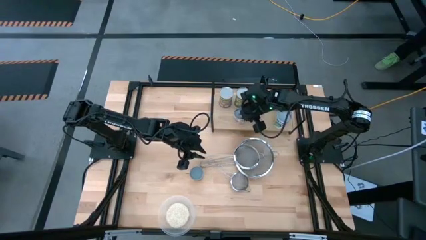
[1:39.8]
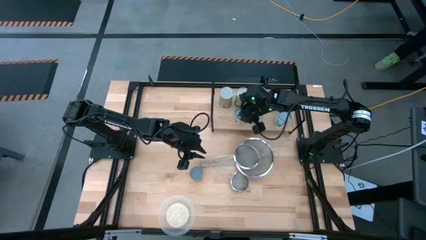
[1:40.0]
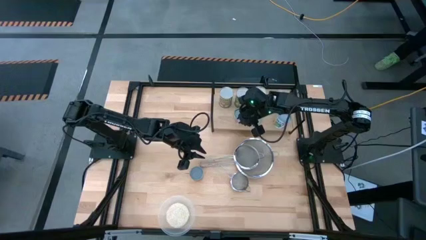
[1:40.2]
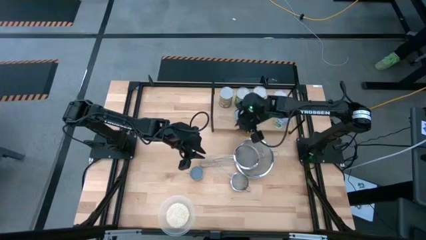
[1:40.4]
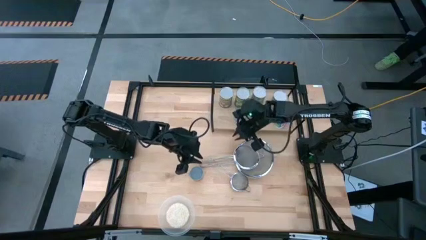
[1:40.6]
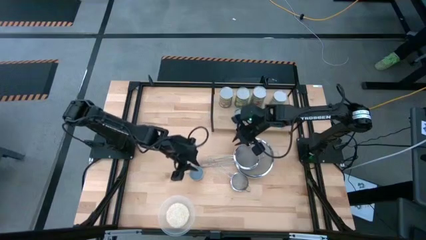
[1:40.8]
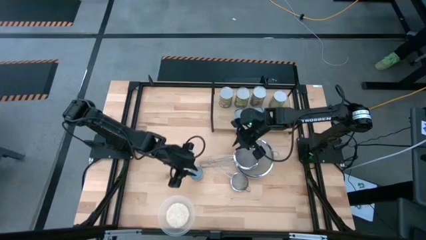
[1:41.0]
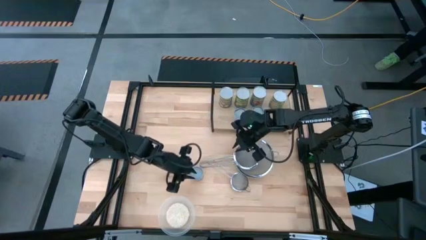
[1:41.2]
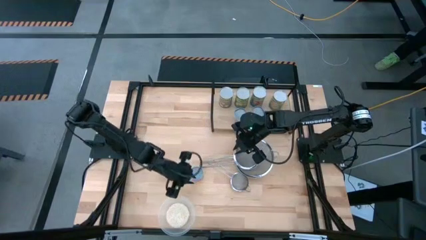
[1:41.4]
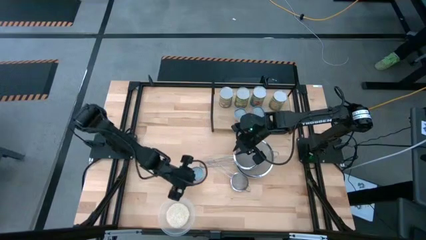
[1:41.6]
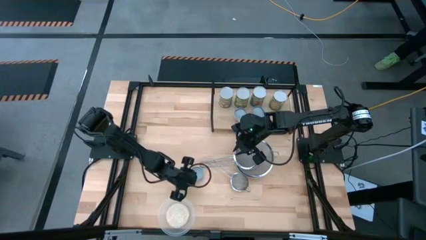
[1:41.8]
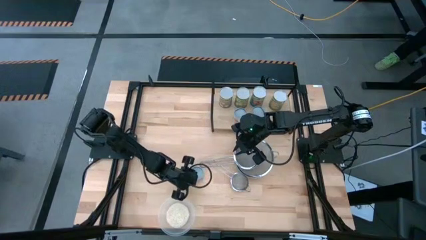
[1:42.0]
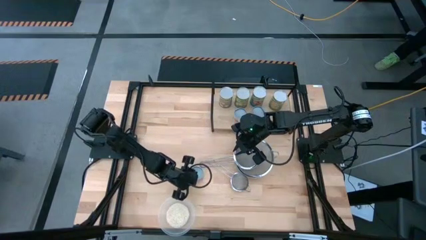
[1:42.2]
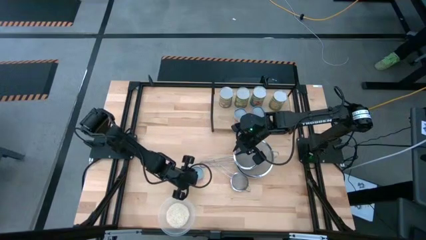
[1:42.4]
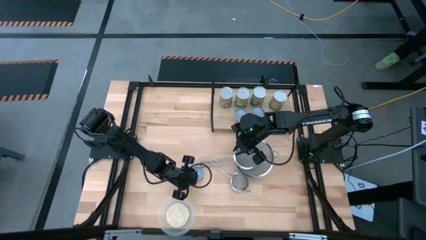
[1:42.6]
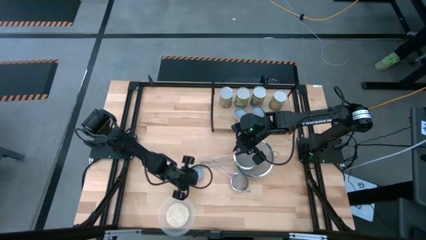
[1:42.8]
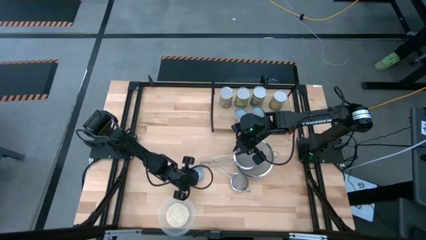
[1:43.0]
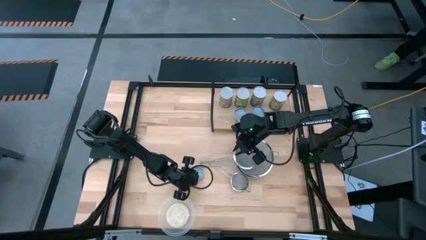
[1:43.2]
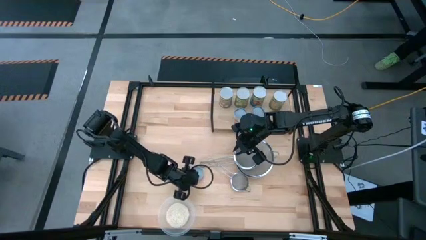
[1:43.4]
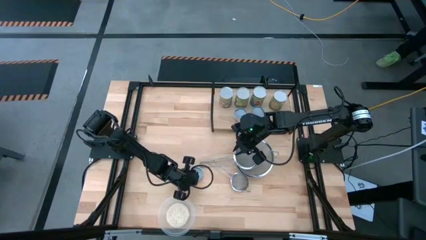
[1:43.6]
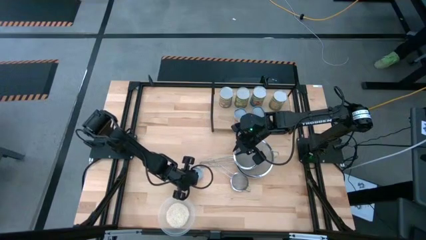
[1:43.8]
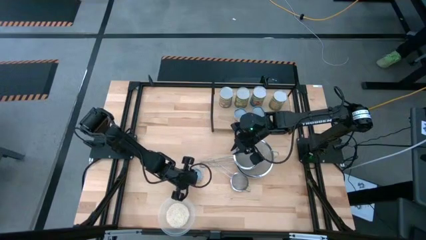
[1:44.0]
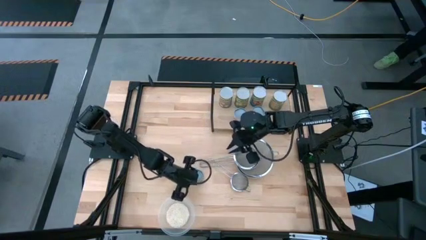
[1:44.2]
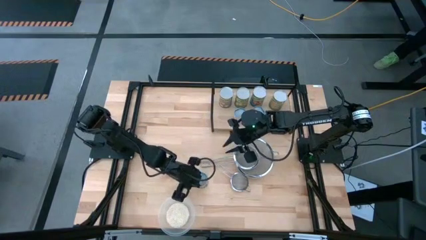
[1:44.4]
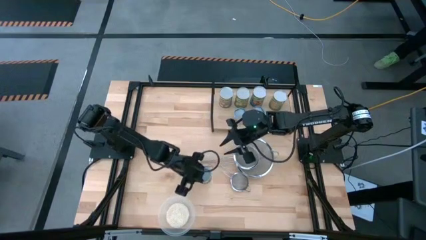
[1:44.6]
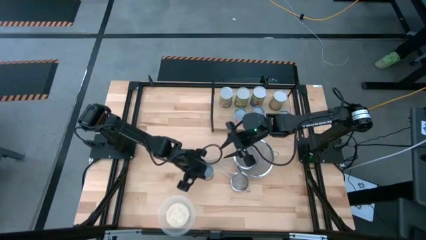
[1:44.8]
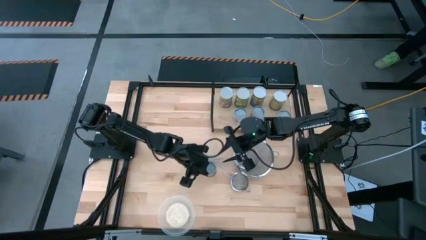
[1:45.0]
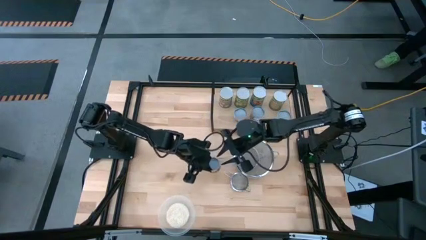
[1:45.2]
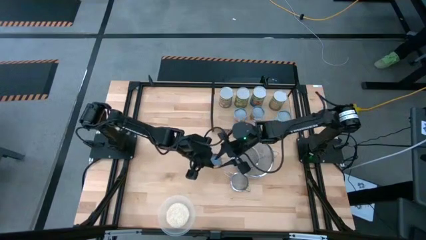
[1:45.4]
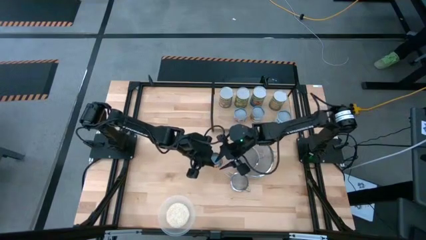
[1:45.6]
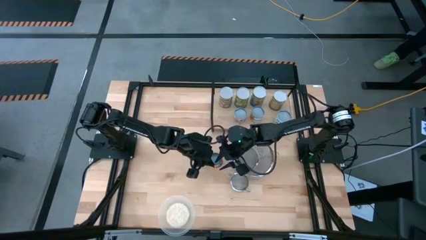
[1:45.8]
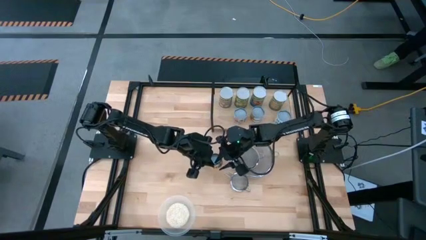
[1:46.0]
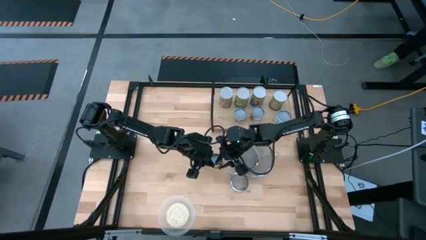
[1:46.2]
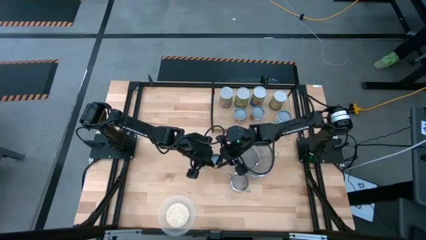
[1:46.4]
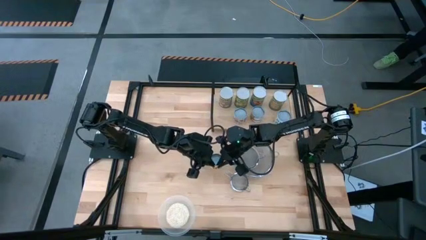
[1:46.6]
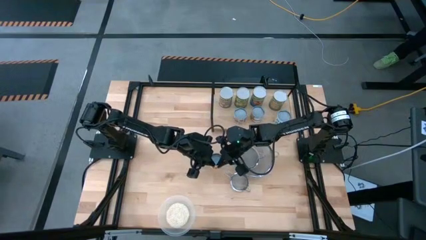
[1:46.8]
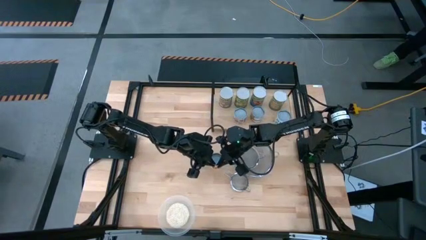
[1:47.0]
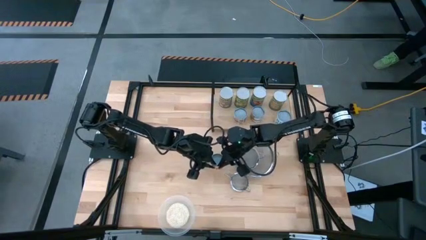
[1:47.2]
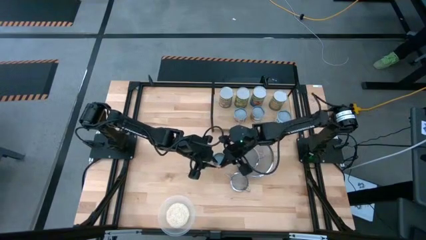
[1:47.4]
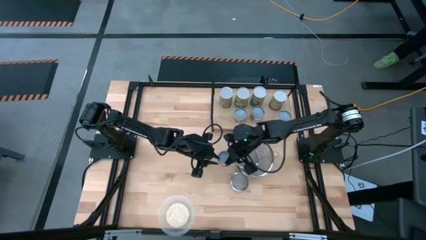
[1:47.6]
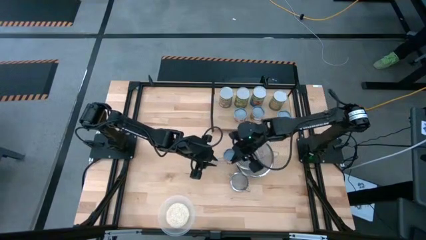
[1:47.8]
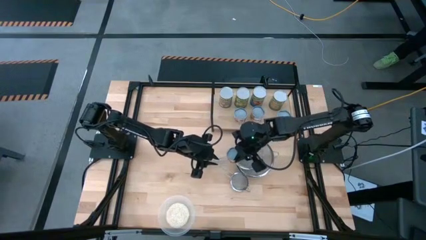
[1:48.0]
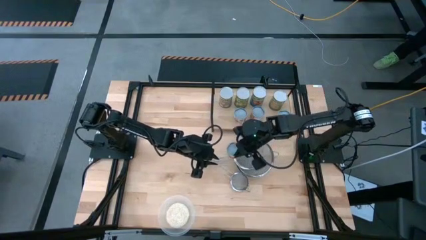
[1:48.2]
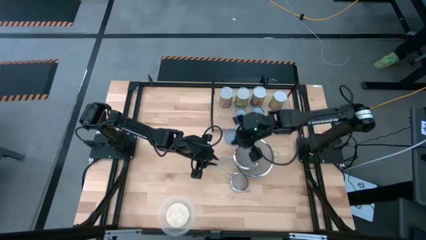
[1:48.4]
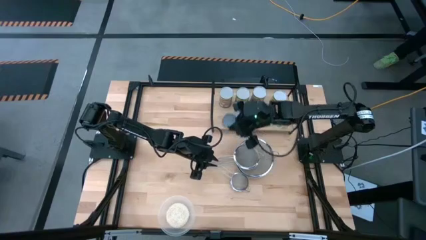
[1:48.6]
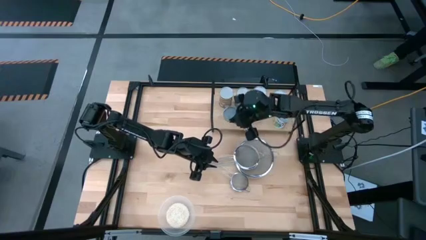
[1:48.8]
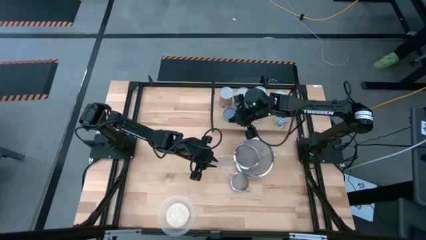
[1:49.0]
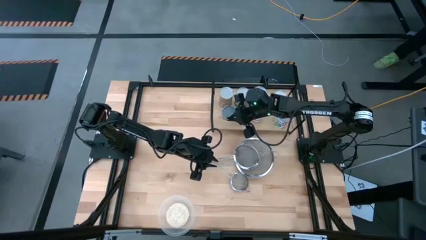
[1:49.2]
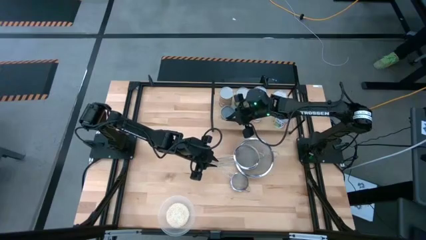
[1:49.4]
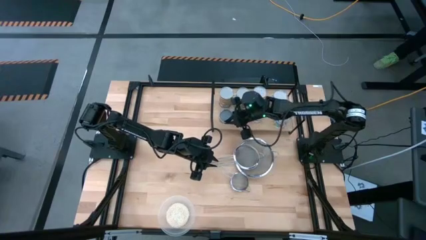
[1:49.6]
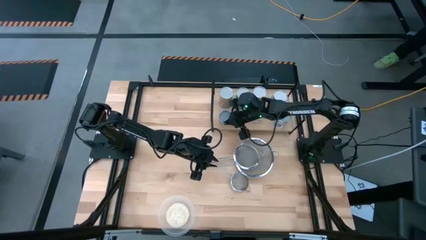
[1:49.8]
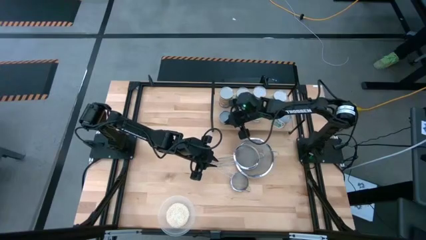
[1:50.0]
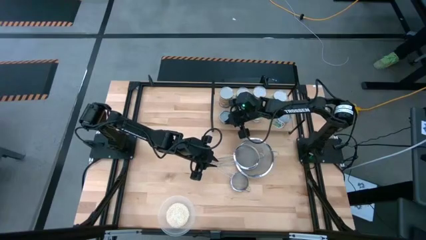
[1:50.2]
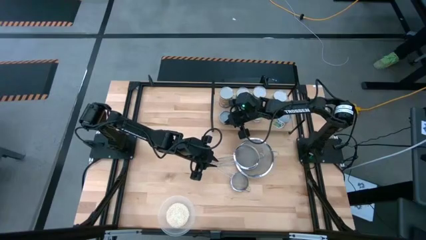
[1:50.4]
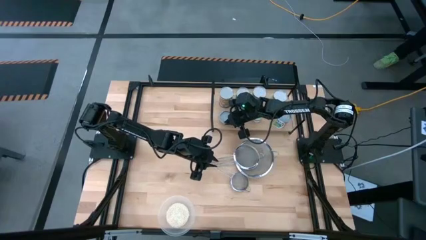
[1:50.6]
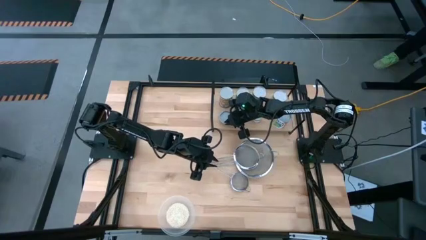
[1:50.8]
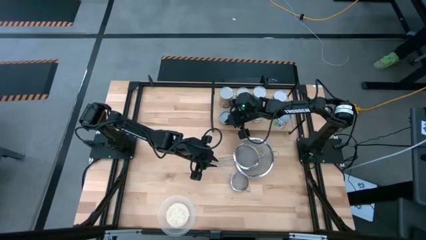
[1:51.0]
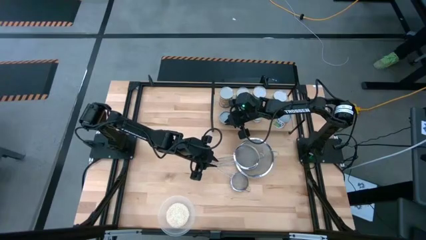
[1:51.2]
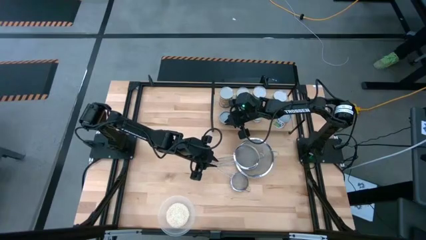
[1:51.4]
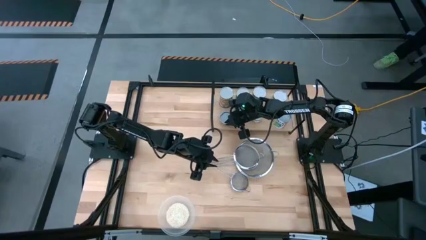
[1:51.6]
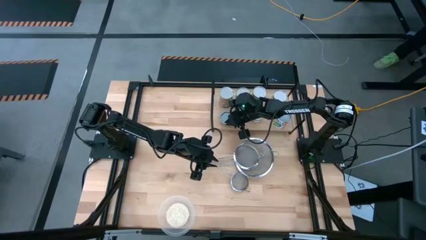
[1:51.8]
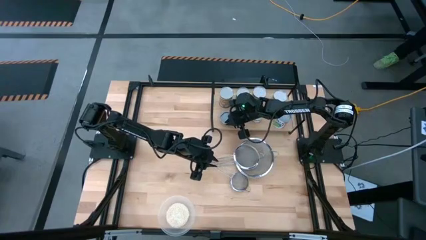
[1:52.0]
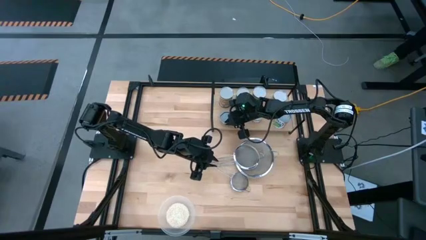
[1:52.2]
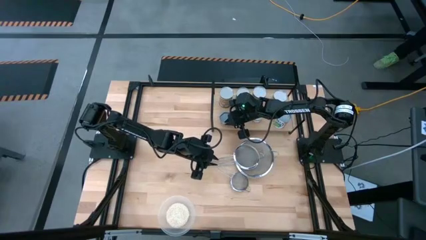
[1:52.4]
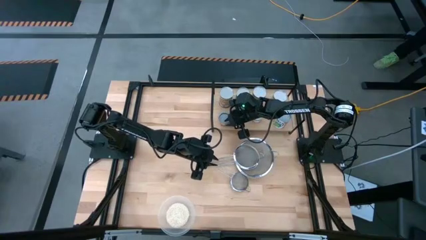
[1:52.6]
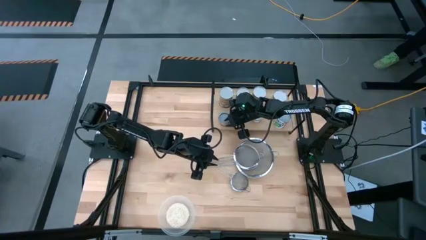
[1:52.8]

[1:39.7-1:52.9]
Task: Pick and place cans onto a shelf
Put the canned pineapple rings on the shelf

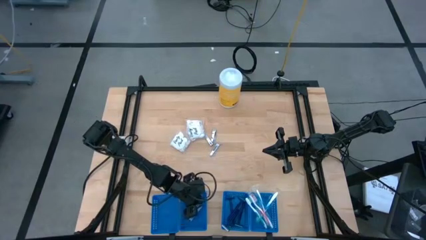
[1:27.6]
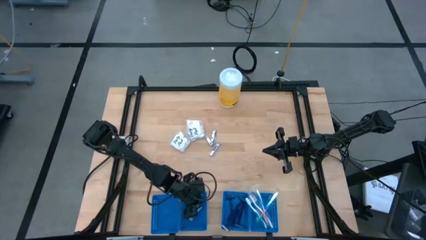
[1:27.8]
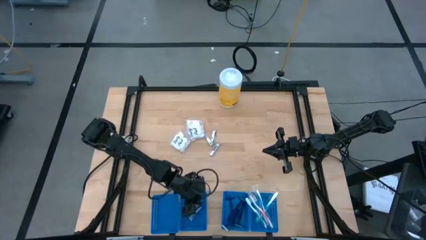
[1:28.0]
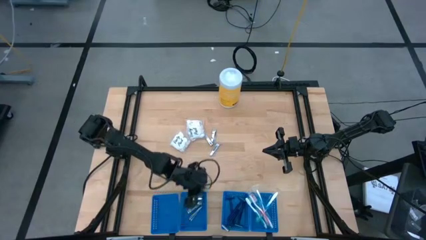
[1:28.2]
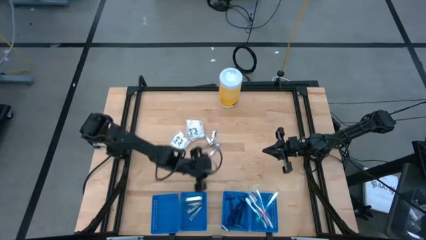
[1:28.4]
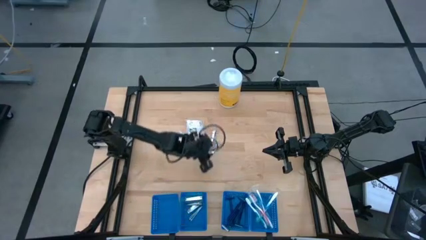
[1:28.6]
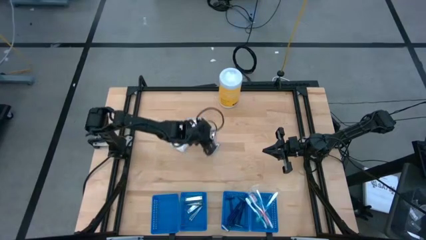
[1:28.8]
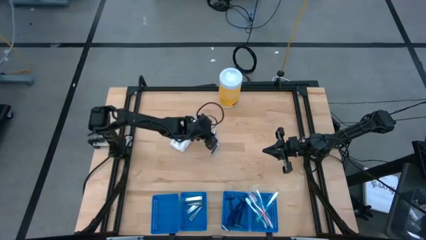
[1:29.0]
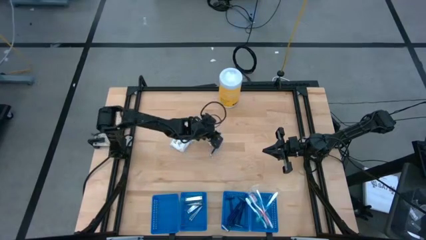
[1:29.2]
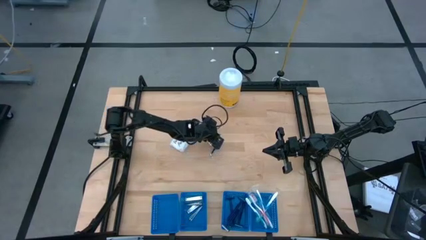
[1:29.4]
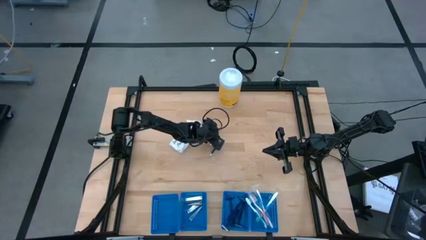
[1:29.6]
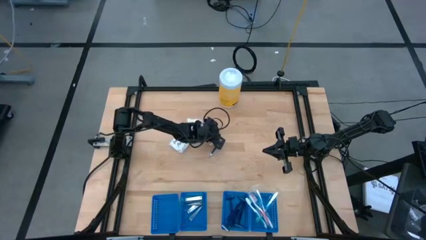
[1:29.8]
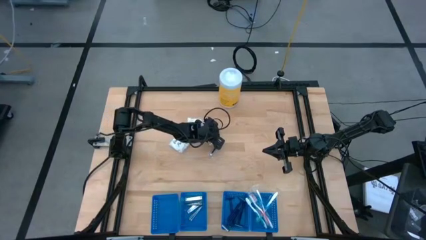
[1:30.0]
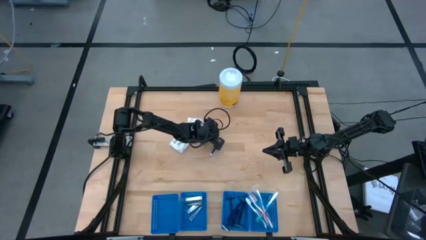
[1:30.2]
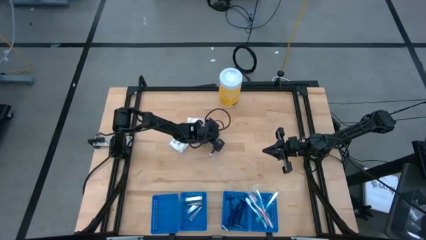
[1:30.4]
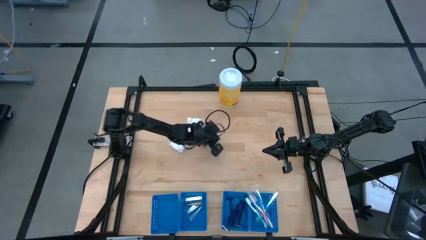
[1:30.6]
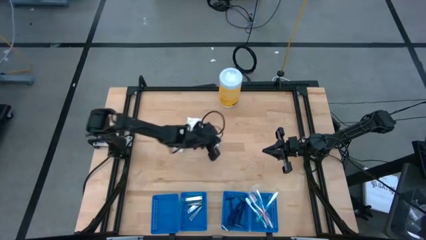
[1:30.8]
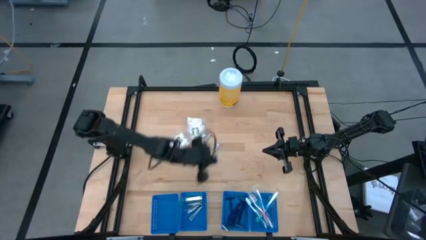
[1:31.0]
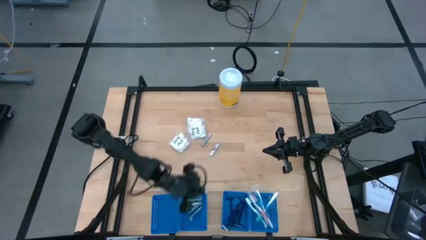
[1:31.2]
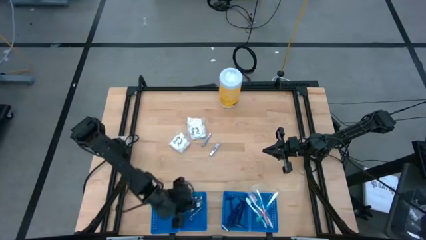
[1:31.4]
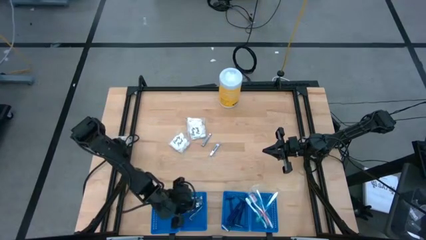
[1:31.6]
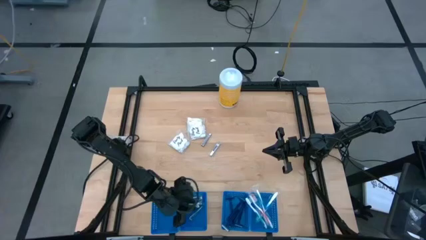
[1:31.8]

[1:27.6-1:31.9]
Task: Pick & Place Travel size toiletries
Put the silver nail cutter into the blue basket
